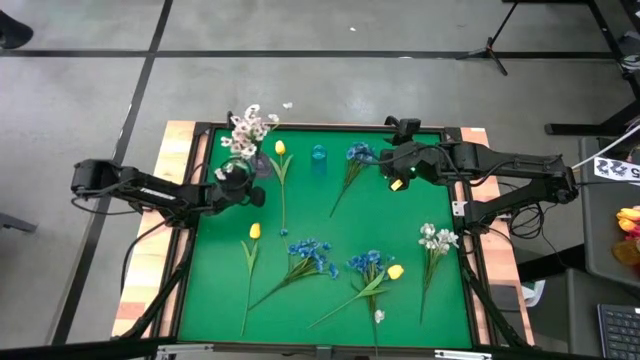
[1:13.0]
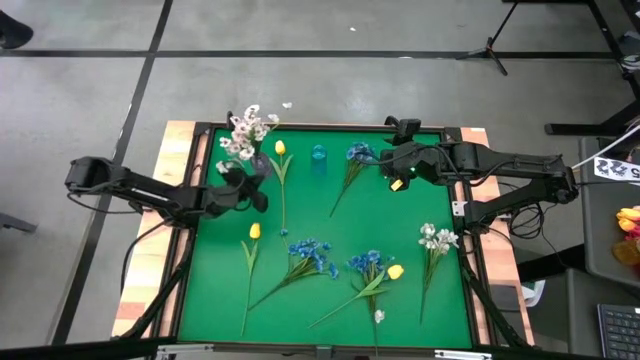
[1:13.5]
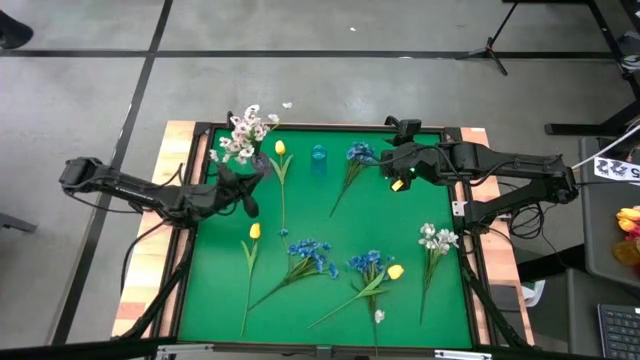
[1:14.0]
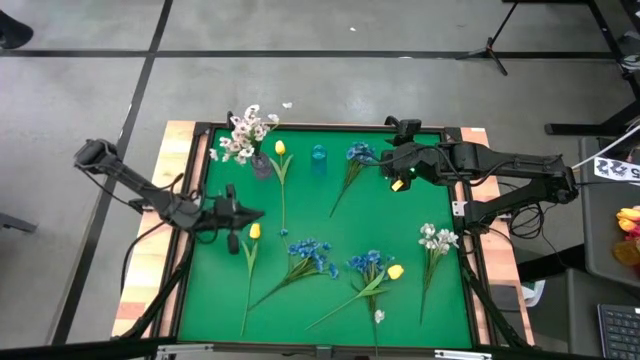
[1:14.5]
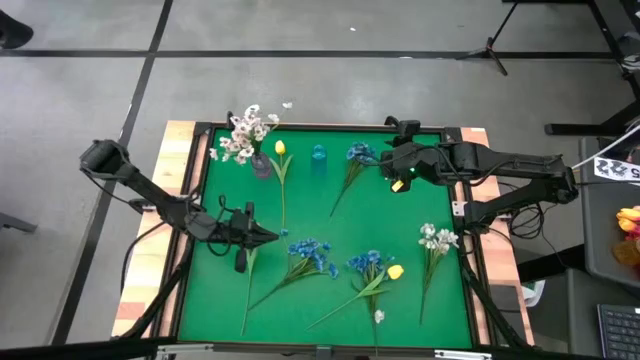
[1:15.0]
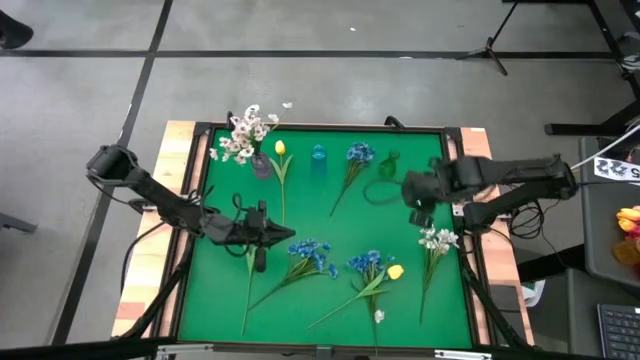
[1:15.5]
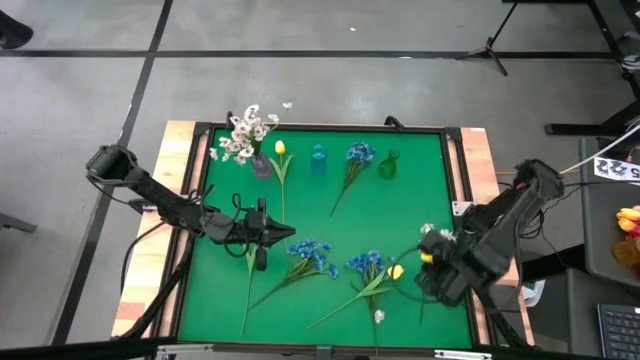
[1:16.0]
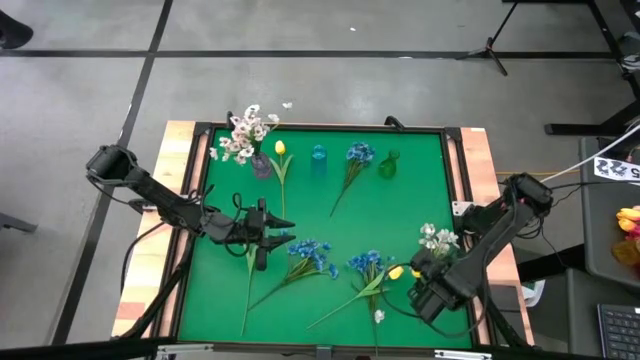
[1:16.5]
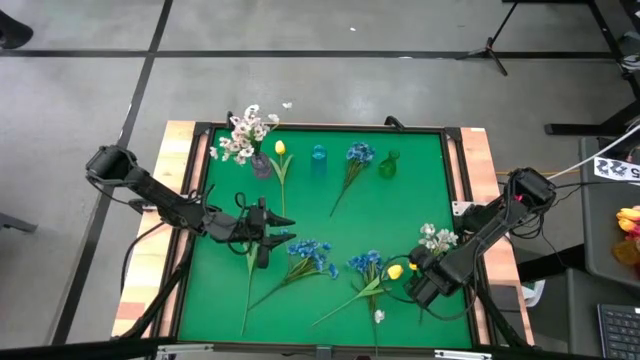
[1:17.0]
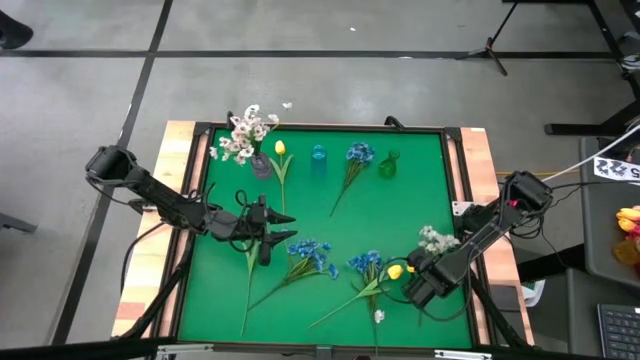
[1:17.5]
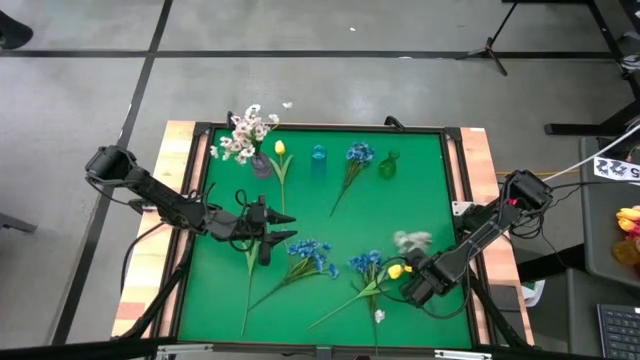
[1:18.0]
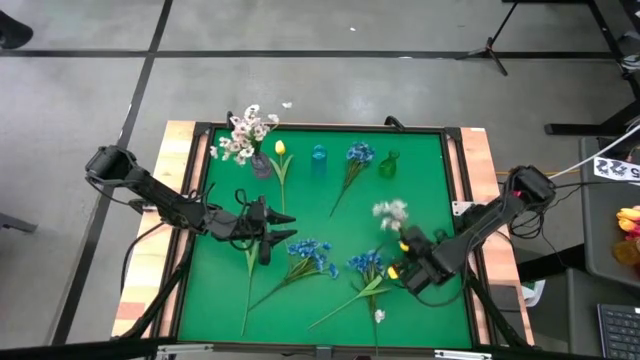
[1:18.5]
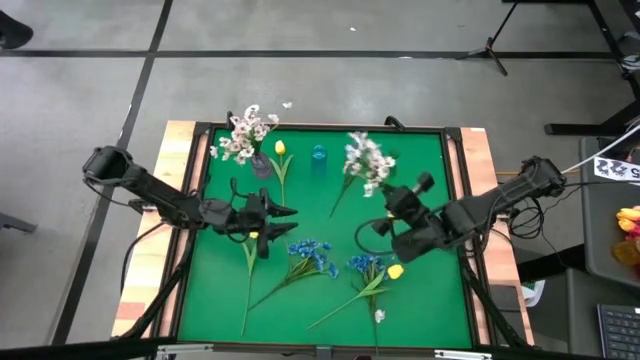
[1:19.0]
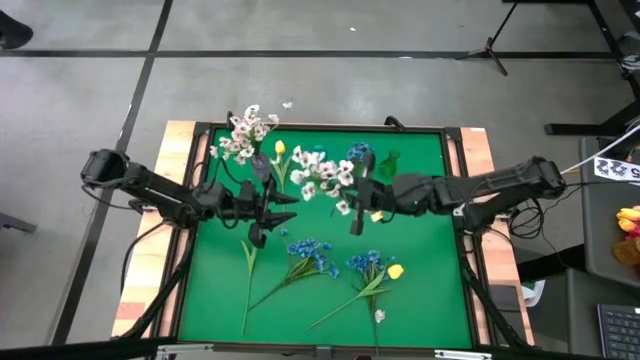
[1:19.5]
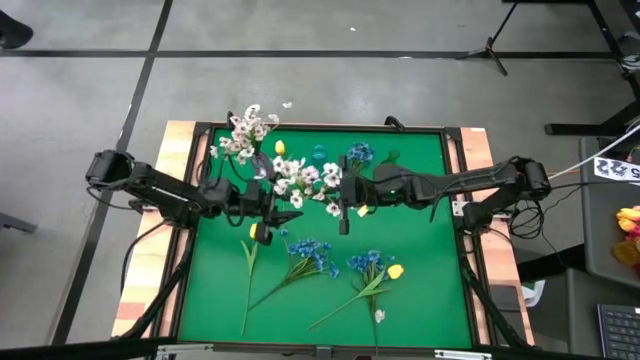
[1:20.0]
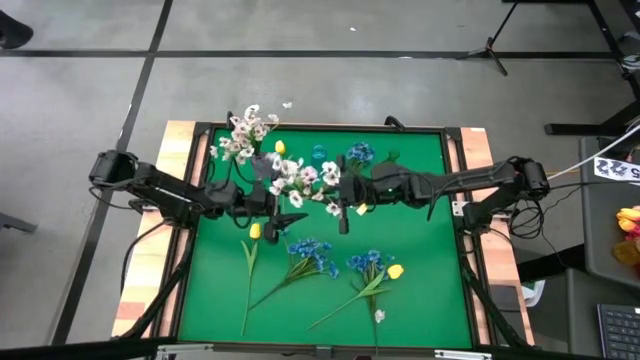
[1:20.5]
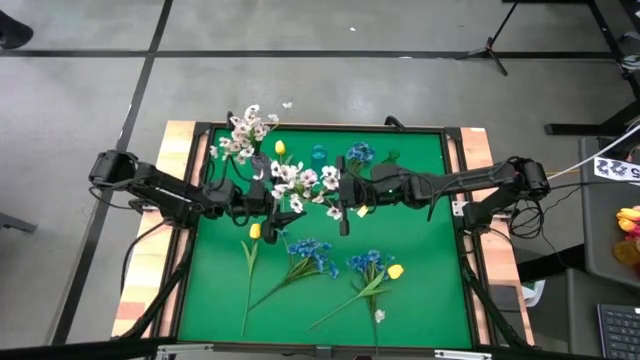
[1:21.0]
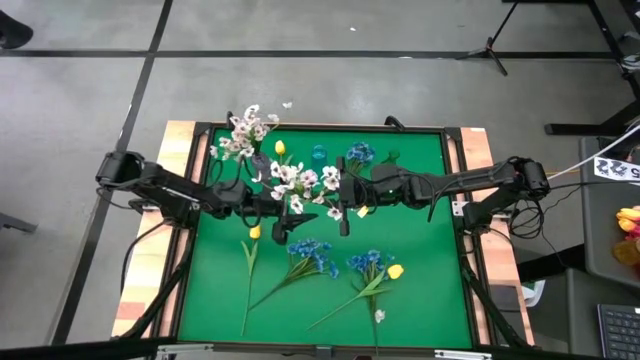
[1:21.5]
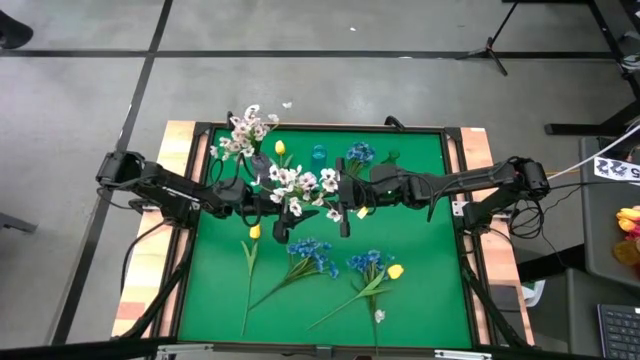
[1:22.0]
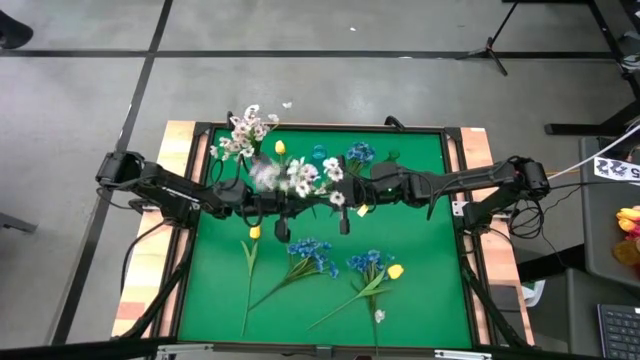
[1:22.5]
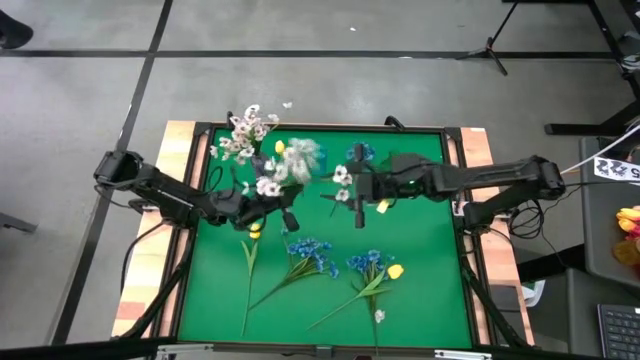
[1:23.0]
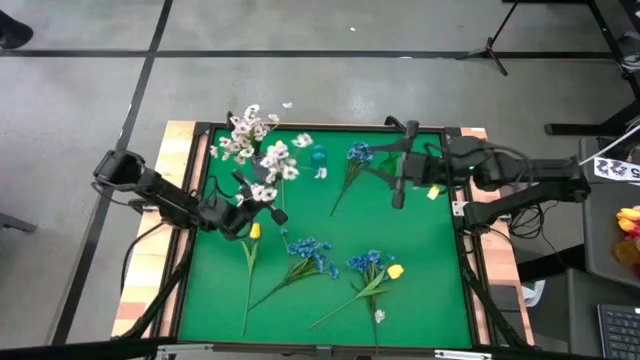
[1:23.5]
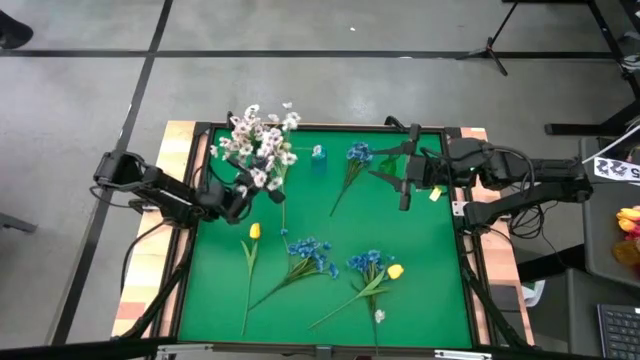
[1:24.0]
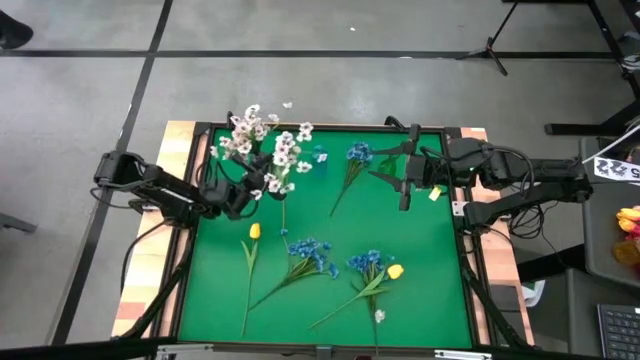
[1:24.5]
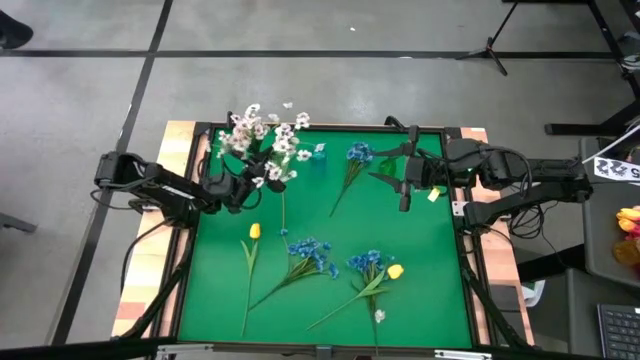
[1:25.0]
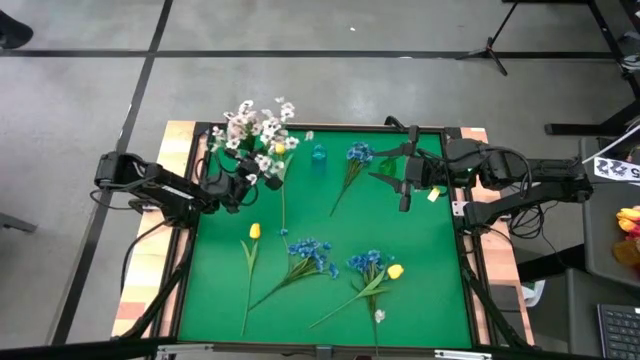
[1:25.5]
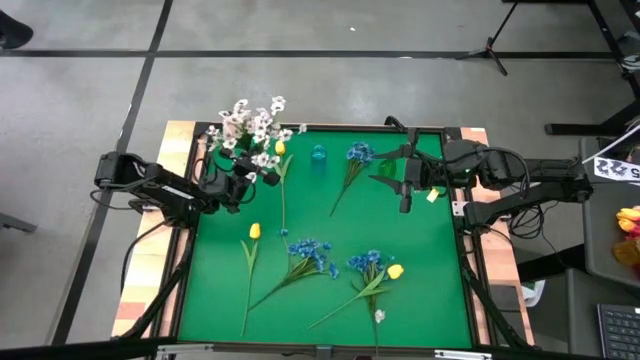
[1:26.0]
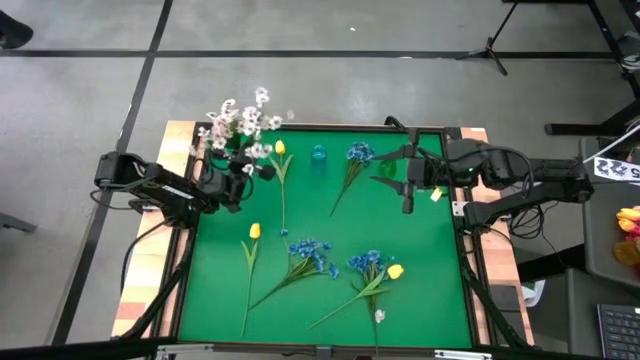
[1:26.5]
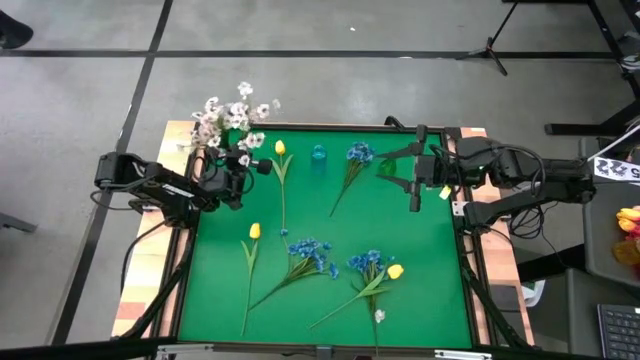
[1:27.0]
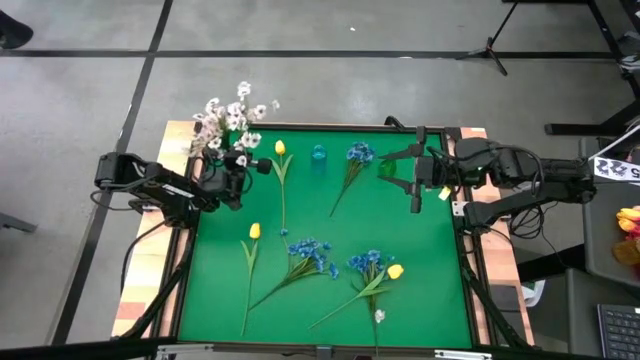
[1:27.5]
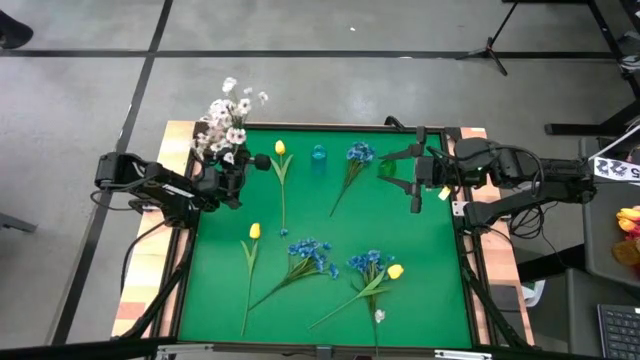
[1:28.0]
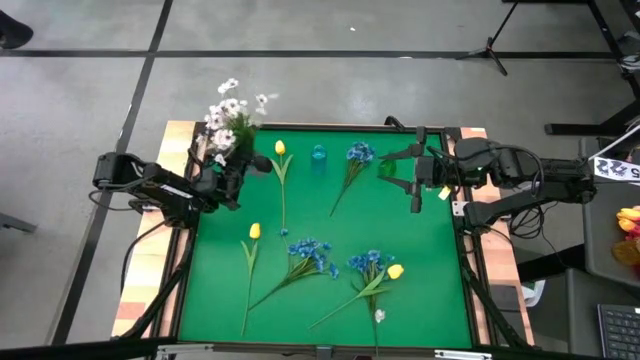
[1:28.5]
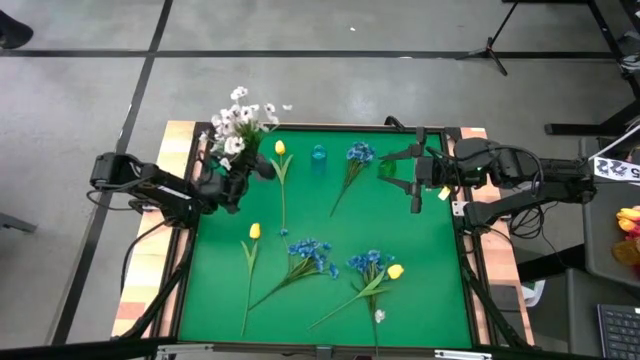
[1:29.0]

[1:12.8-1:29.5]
Task: Sort flowers into vase by color
Put the white flowers into the violet vase

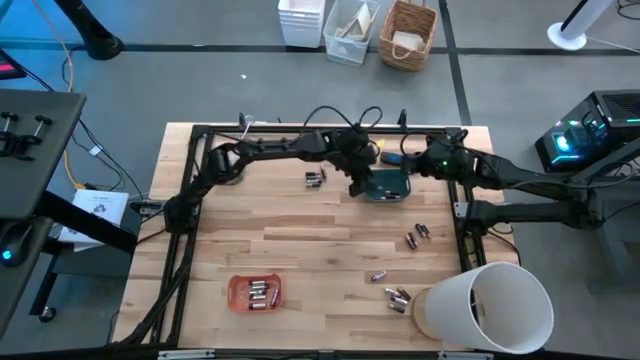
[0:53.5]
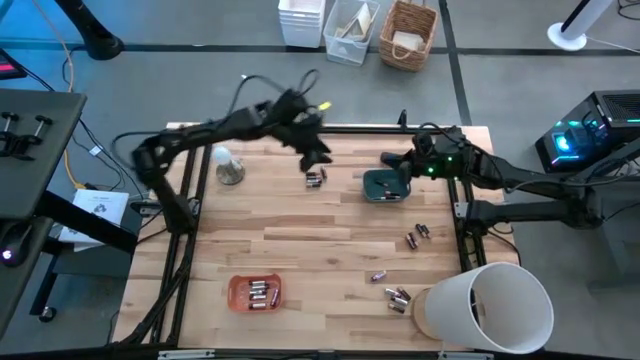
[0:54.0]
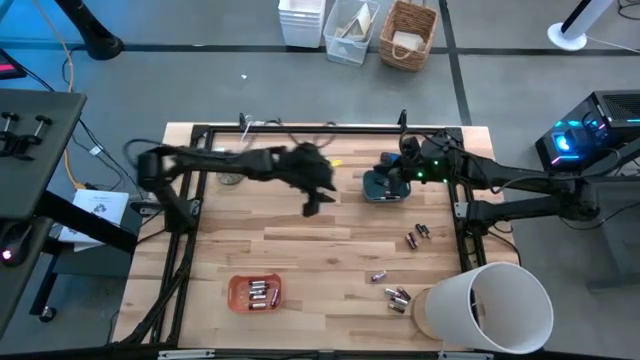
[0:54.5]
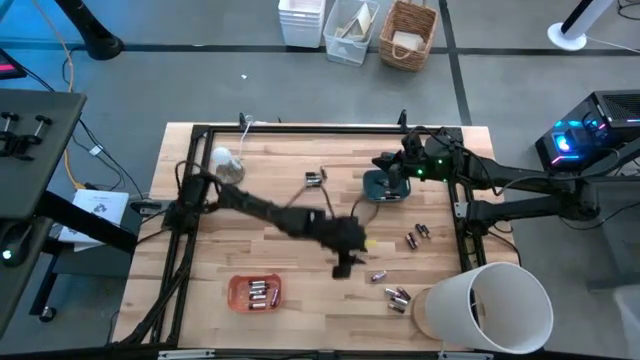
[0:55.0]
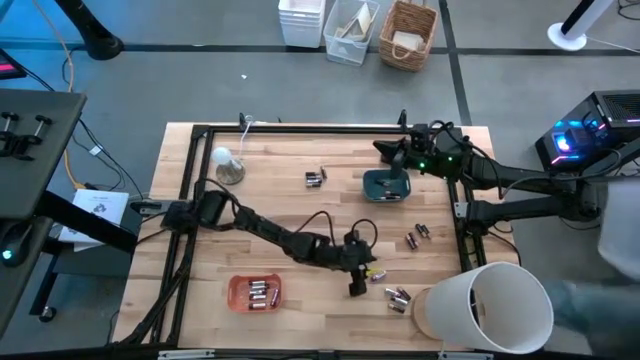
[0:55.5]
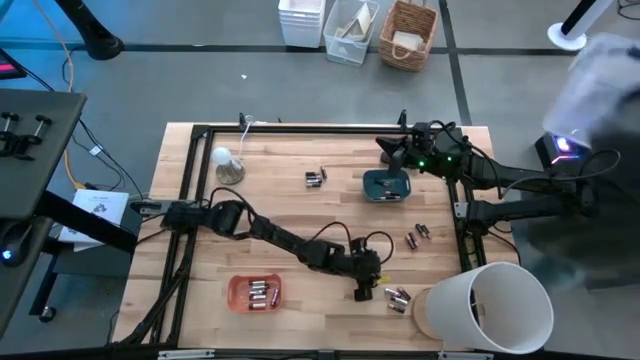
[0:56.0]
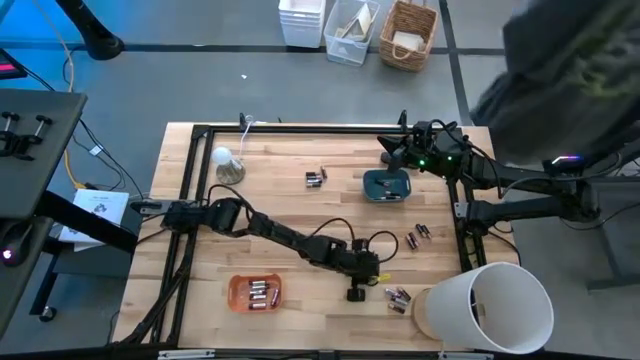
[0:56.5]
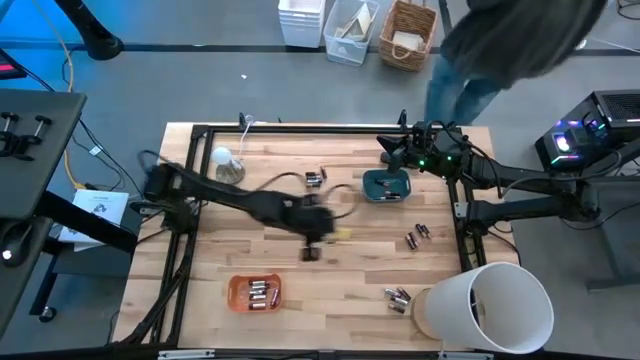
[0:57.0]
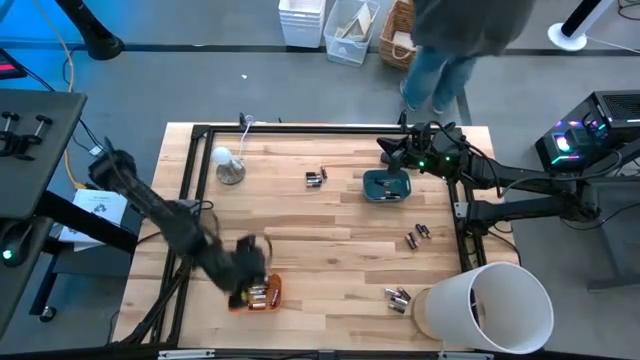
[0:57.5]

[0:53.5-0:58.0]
Task: Sort batteries
Put the silver battery into the orange bin
